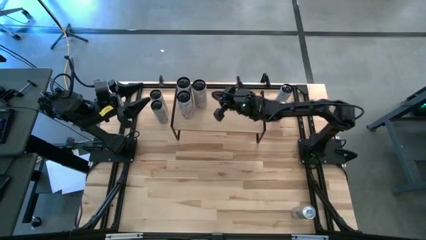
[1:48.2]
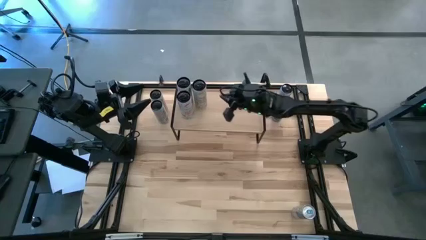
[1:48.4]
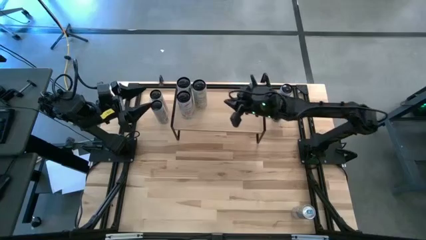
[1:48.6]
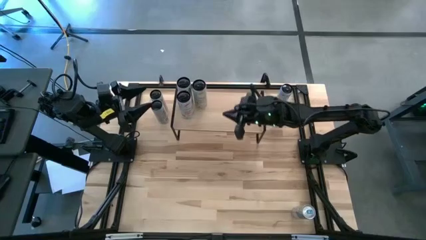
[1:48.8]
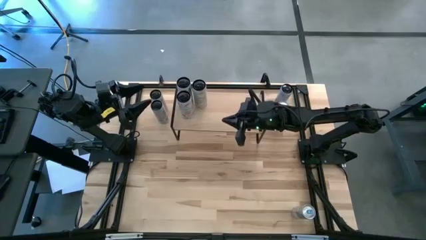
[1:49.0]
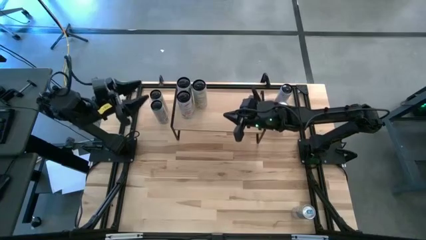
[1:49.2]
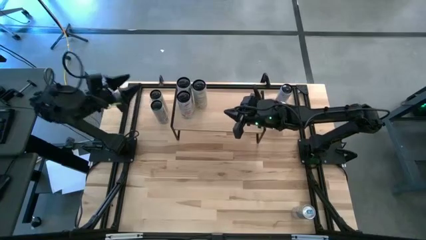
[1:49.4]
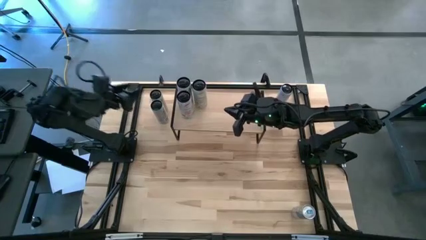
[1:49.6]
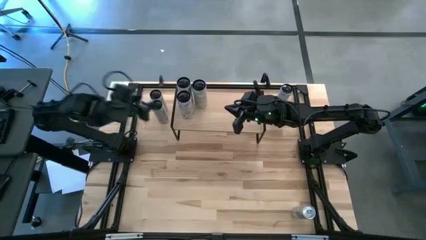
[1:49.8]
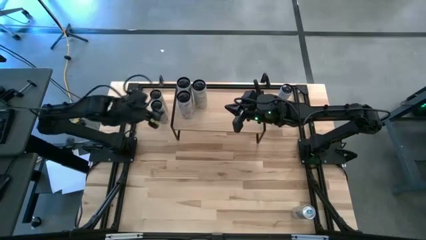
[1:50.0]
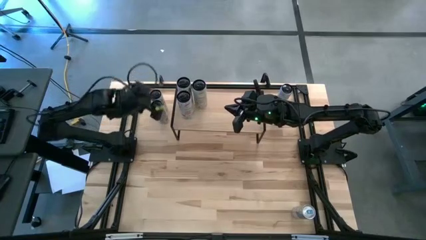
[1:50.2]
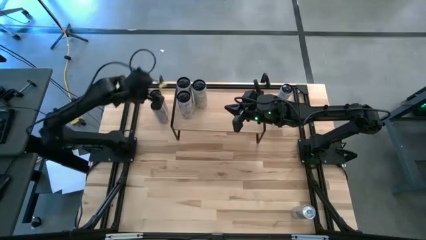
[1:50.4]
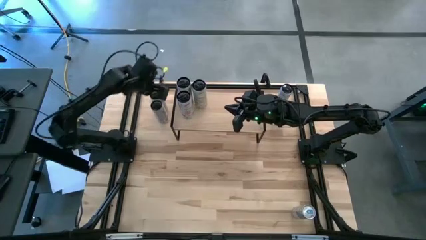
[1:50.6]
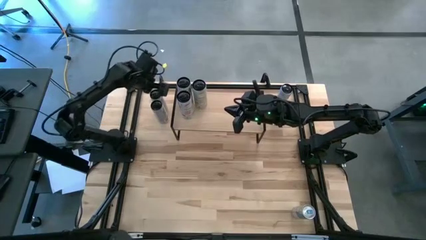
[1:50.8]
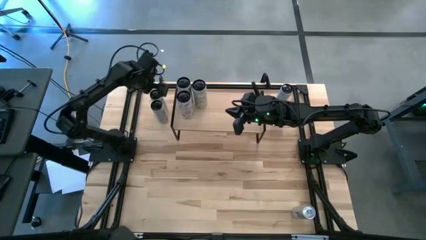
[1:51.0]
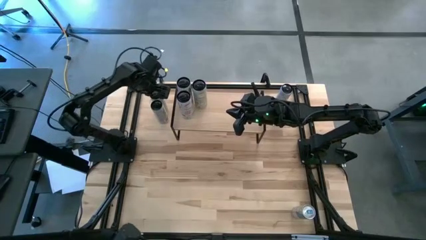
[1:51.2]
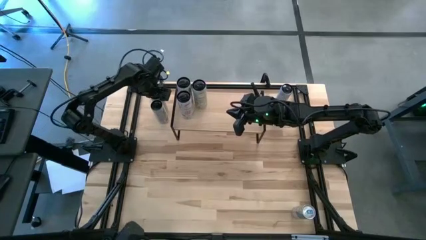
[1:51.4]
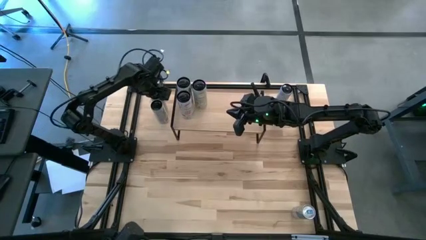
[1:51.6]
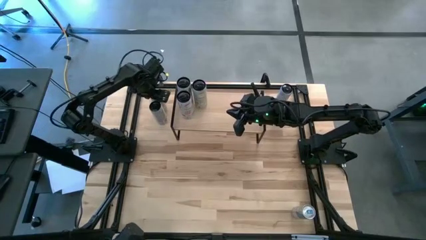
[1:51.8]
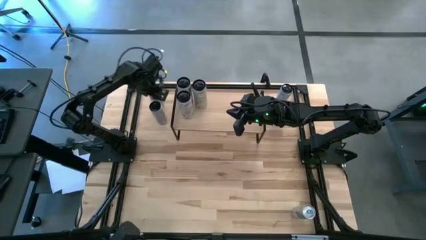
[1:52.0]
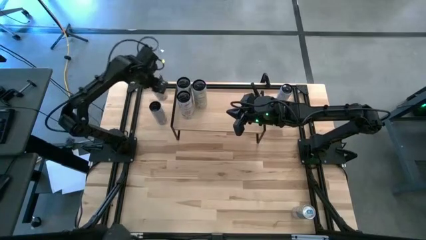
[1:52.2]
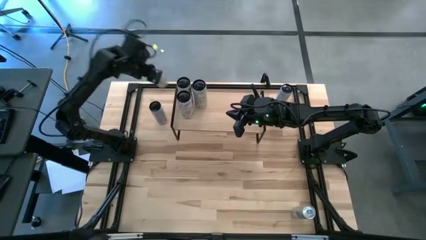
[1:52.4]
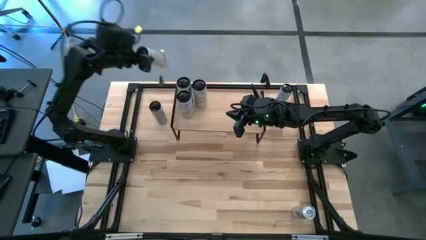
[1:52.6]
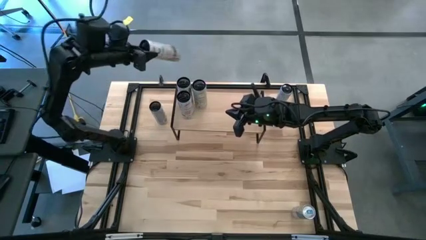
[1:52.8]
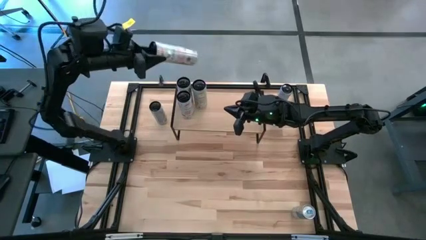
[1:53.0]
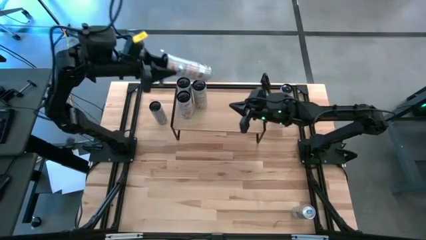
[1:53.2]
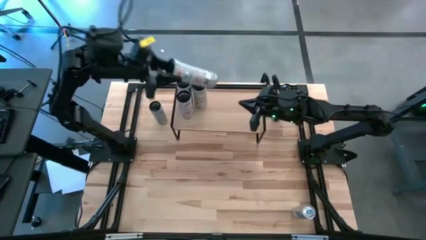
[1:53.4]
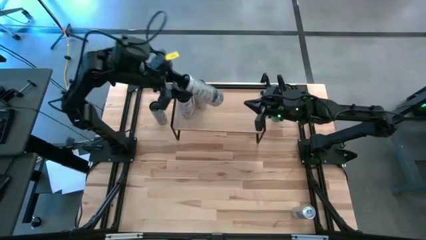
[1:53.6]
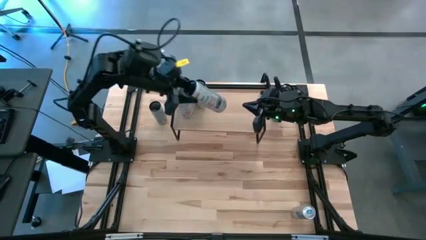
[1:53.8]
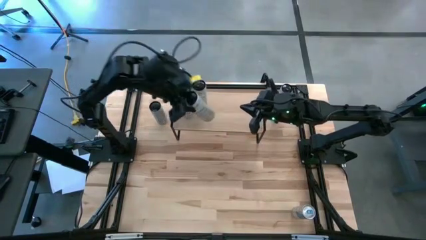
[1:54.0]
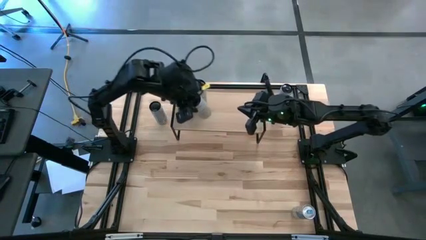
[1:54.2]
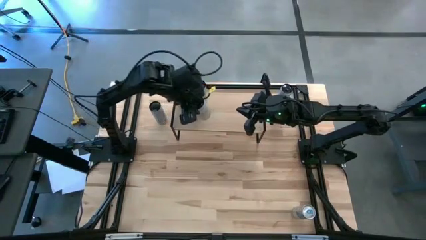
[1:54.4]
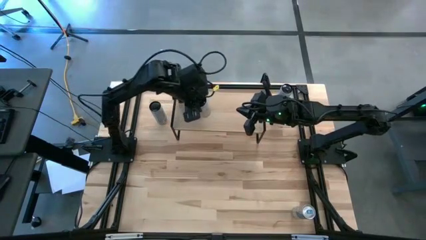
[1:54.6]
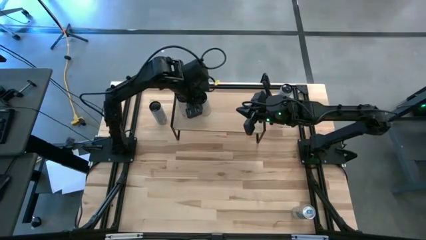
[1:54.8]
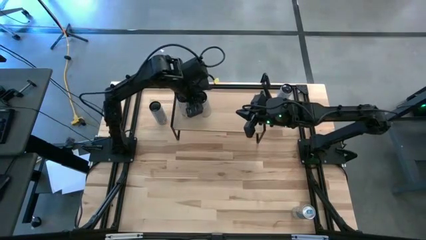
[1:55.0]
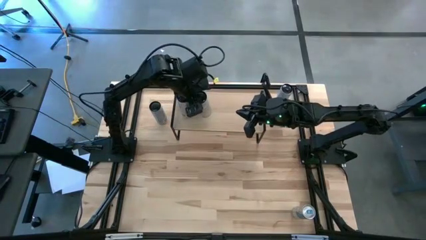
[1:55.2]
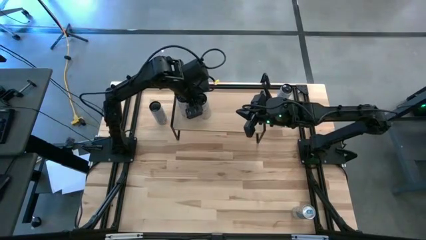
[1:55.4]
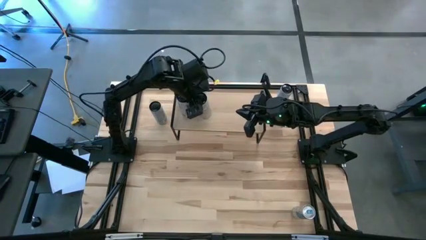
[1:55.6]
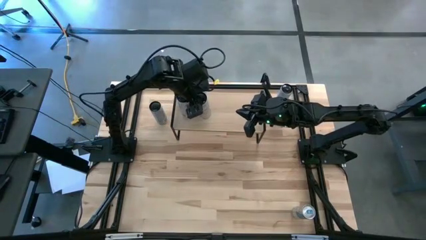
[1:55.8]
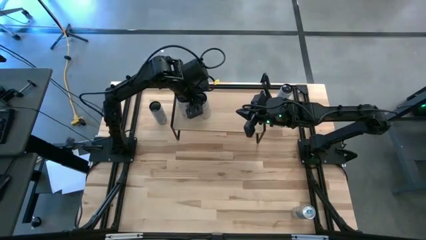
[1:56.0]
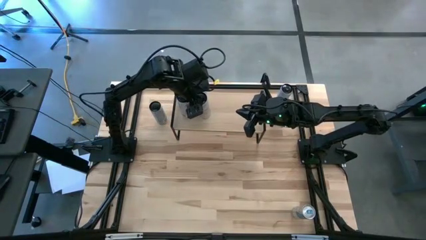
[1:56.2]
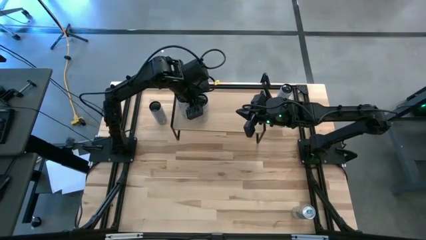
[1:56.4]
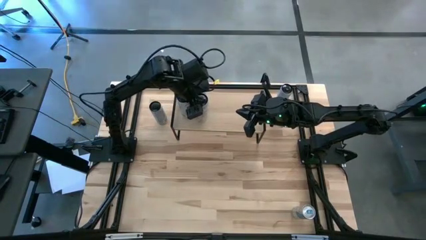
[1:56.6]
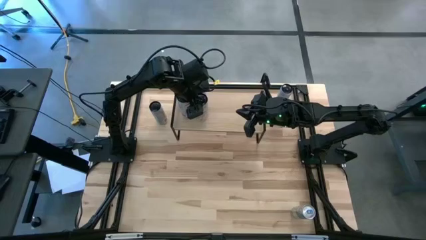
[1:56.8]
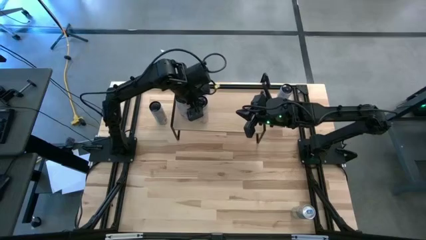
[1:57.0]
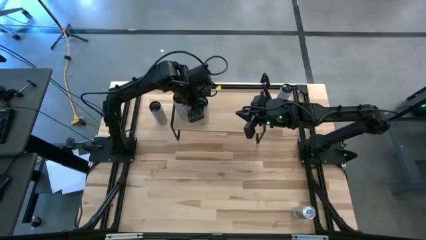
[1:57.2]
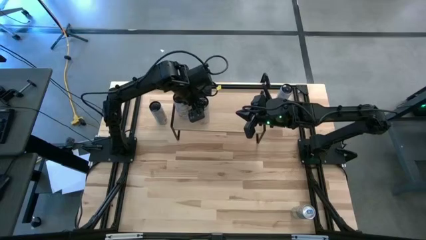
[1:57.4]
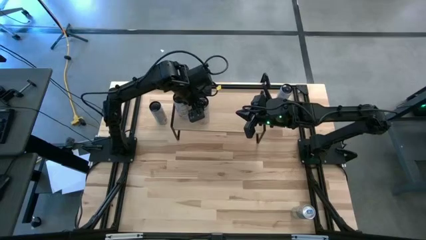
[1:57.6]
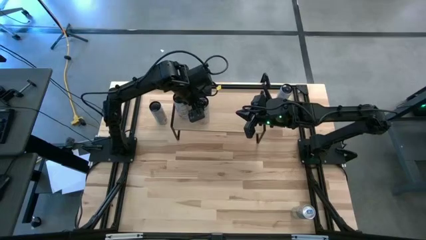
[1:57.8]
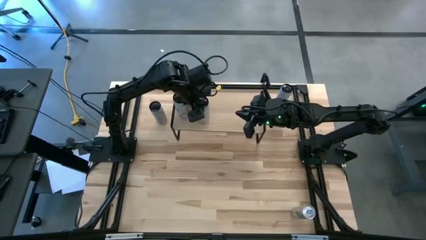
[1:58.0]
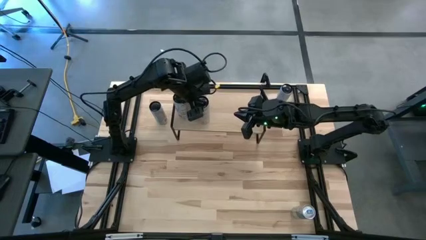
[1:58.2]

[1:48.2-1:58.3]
Task: Place canned beverage on shelf
Put the white yellow soda can on the shelf aligned with the other white yellow soda can
